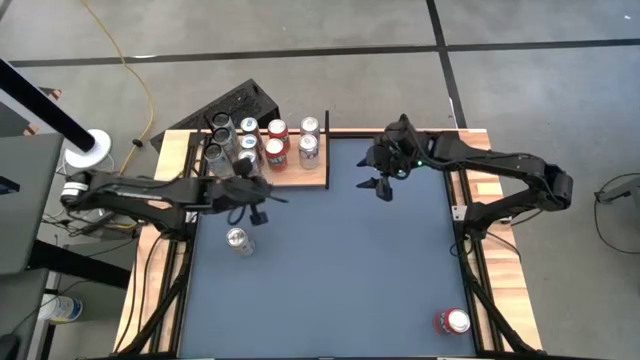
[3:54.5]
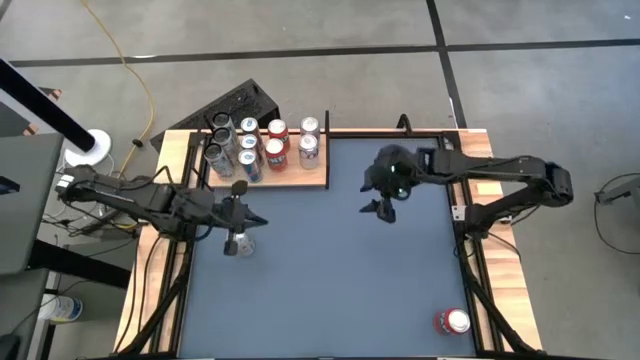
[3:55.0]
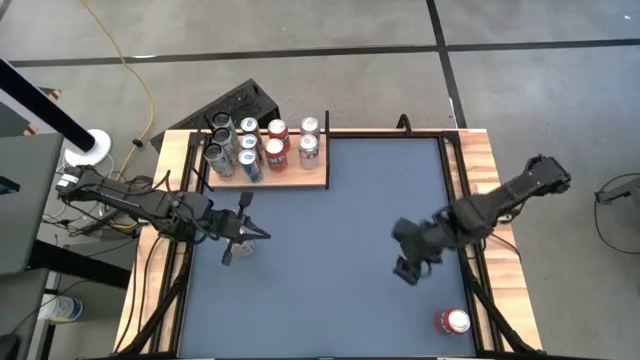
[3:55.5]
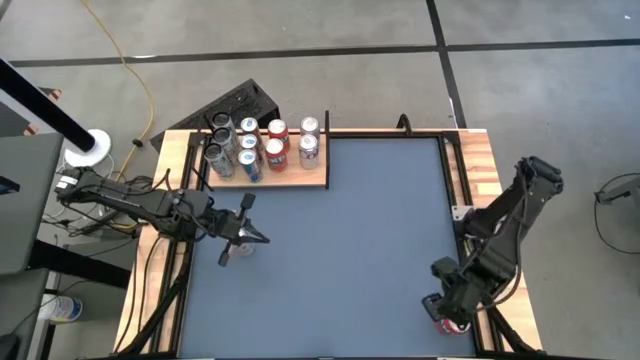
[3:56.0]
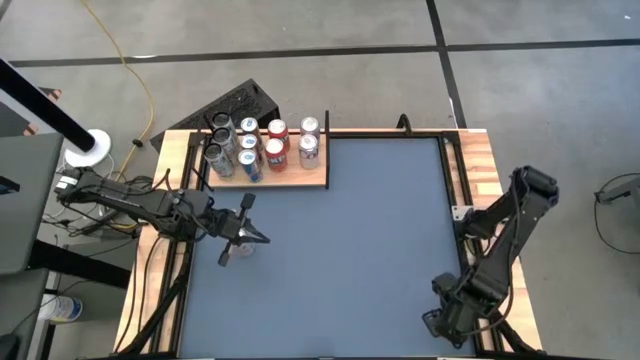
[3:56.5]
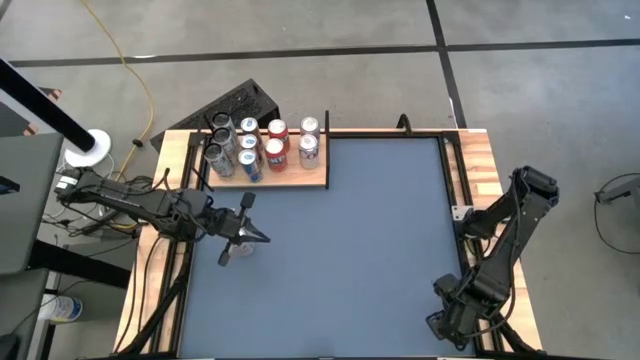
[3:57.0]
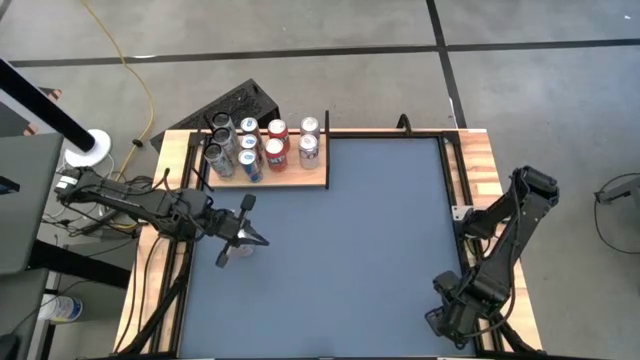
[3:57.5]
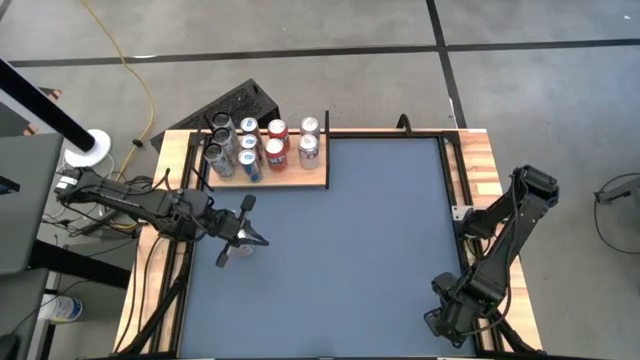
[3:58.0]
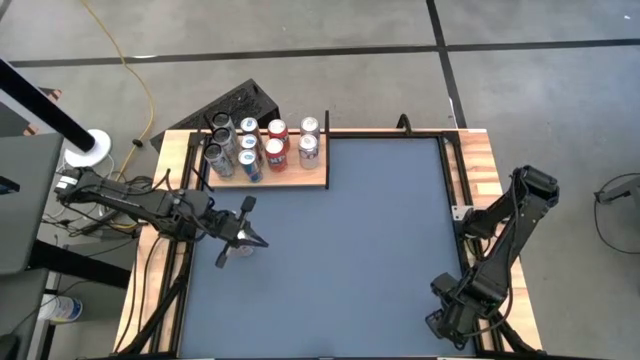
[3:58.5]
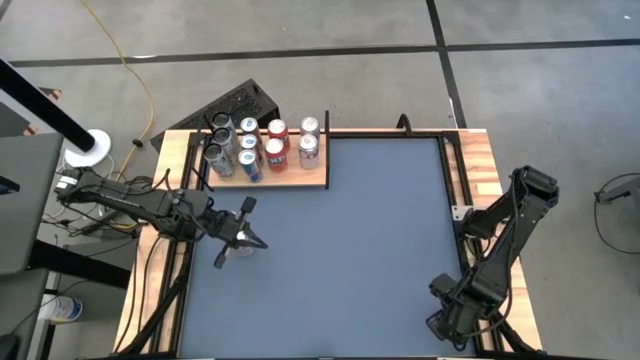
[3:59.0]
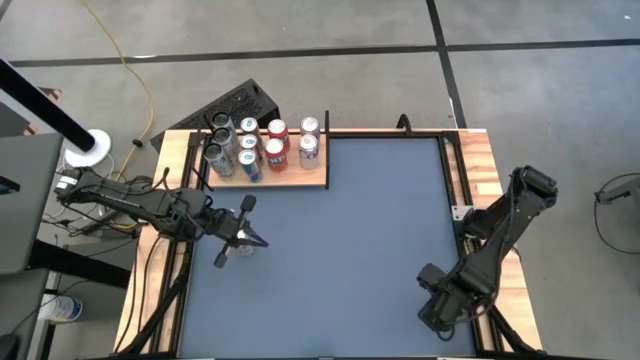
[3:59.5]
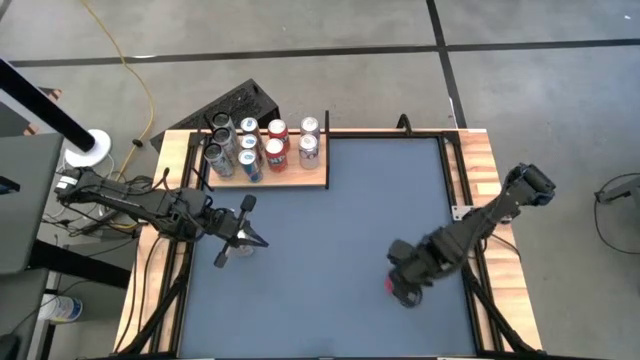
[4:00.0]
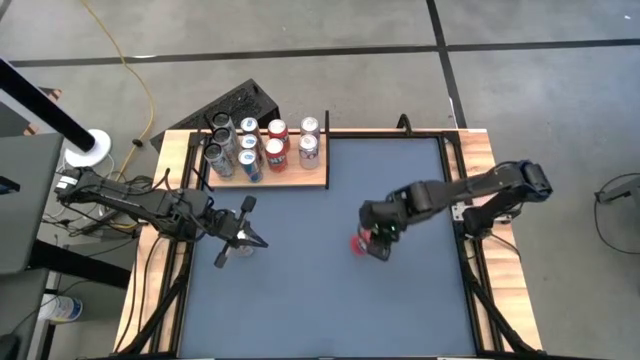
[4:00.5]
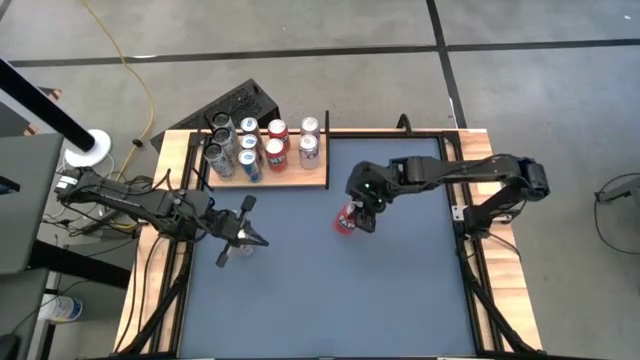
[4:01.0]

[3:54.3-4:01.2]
Task: Place canned beverage on shelf
Put the red soda can on the shelf aligned with the other orange soda can

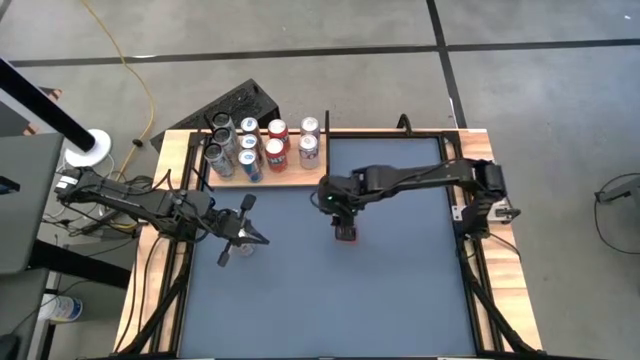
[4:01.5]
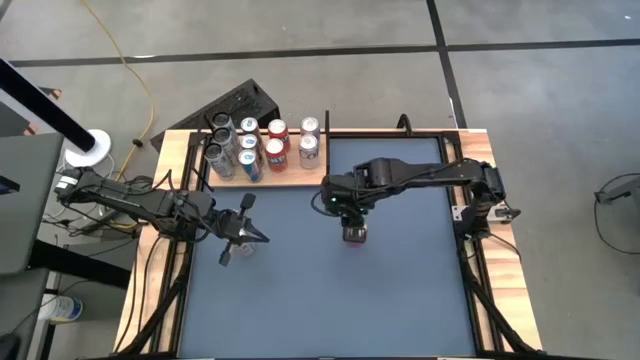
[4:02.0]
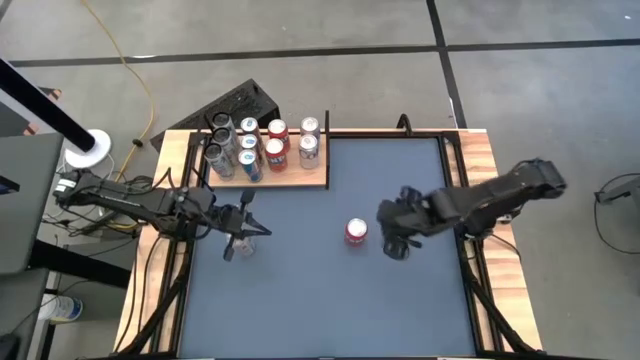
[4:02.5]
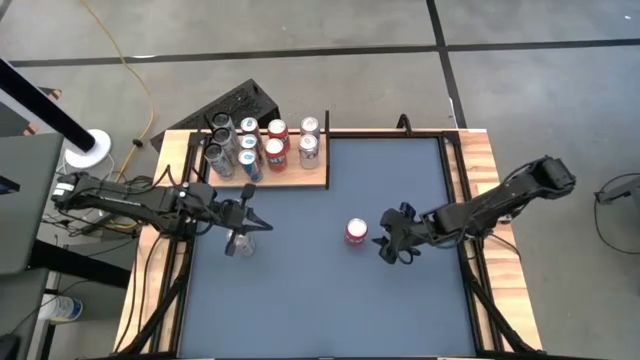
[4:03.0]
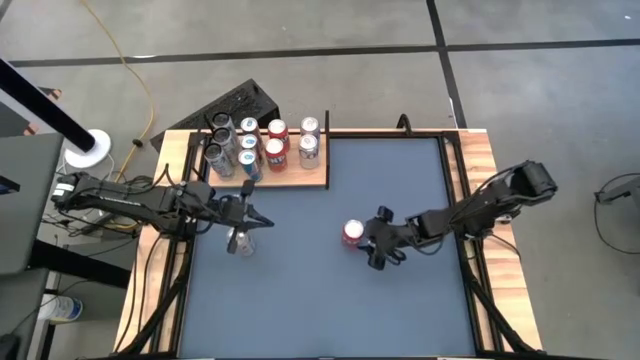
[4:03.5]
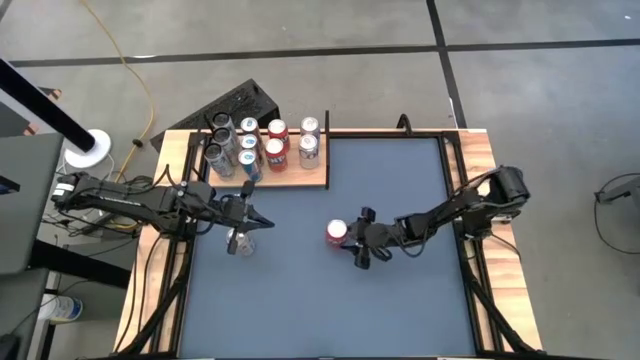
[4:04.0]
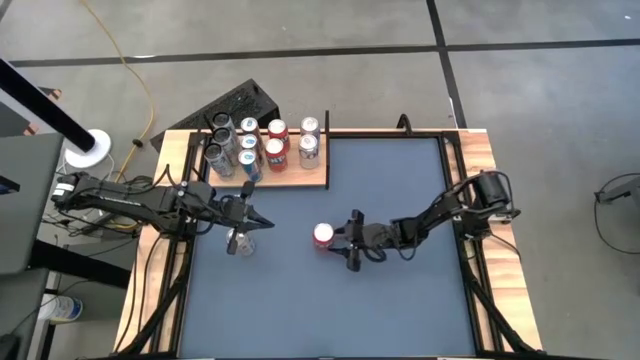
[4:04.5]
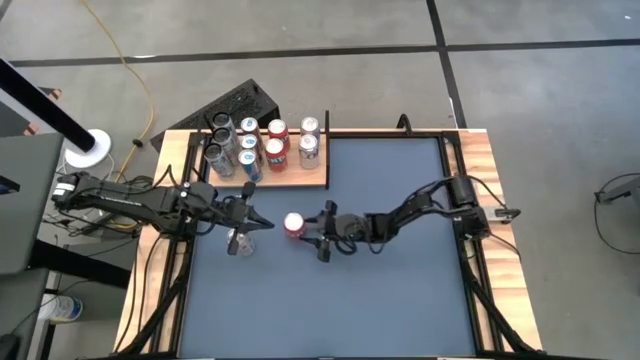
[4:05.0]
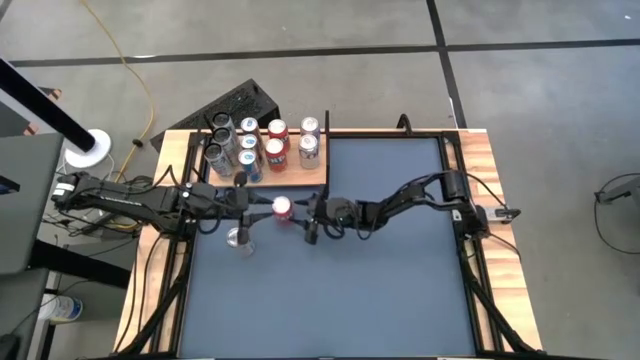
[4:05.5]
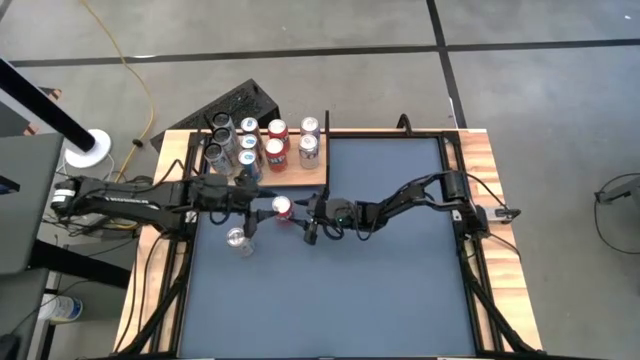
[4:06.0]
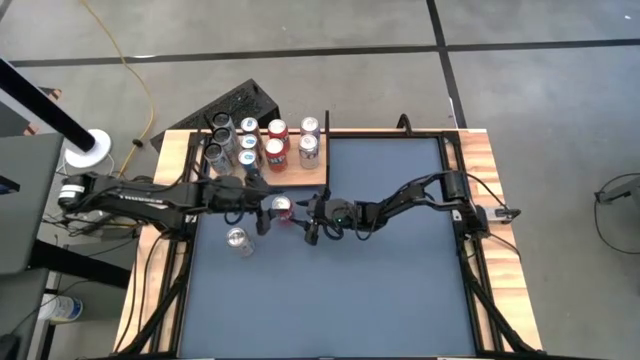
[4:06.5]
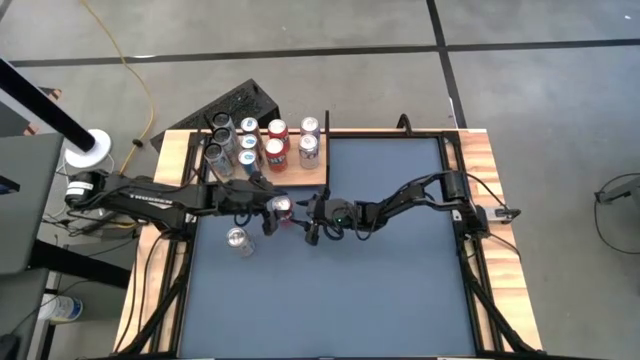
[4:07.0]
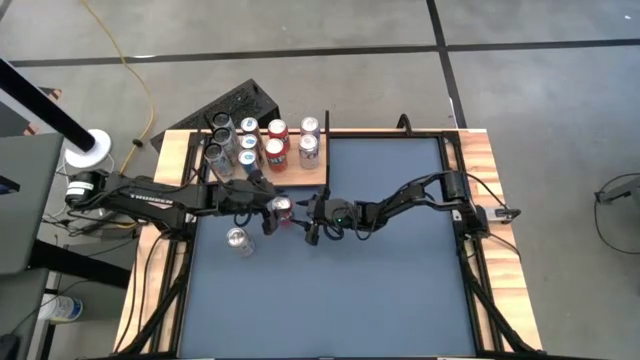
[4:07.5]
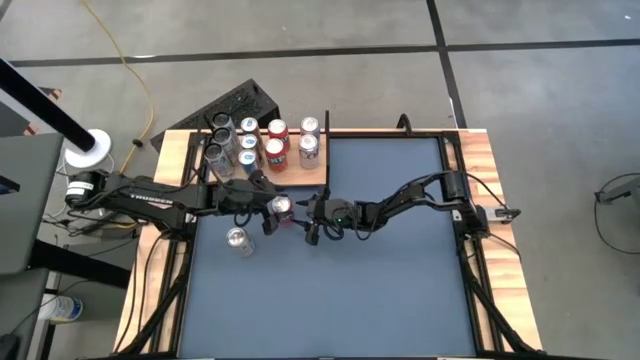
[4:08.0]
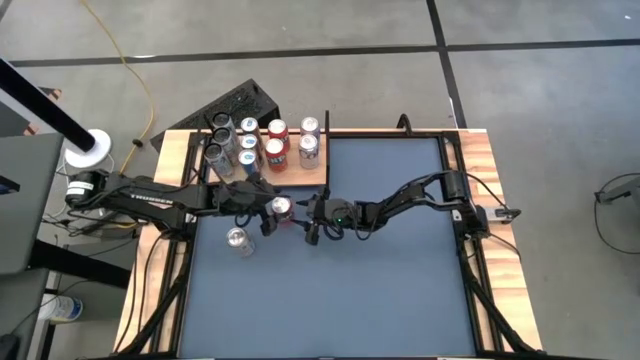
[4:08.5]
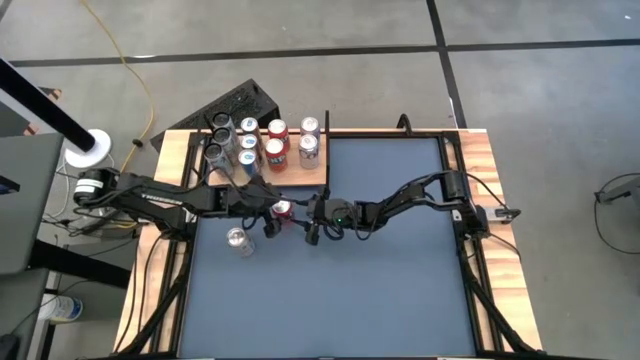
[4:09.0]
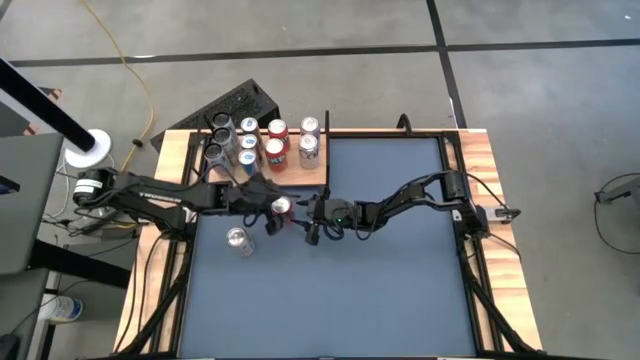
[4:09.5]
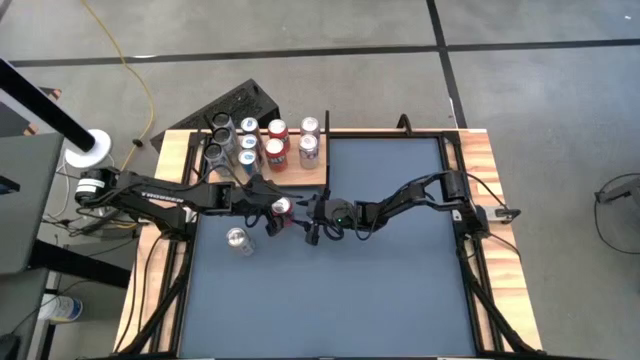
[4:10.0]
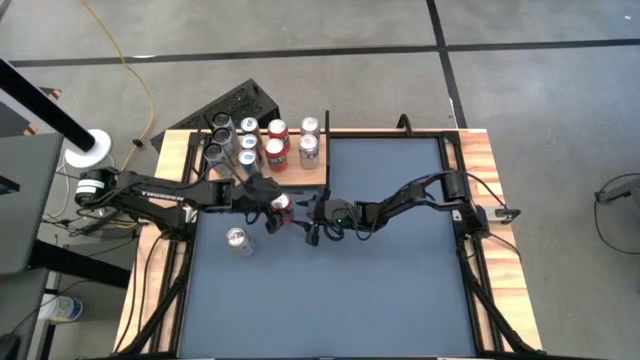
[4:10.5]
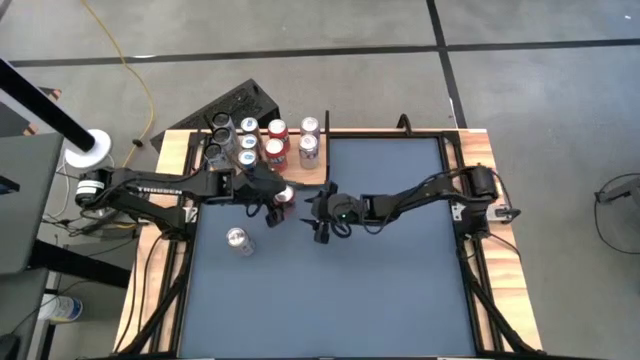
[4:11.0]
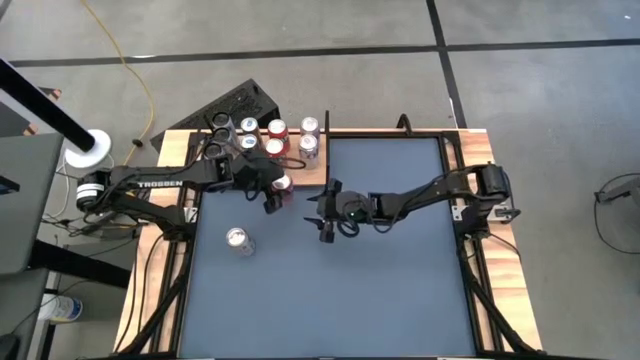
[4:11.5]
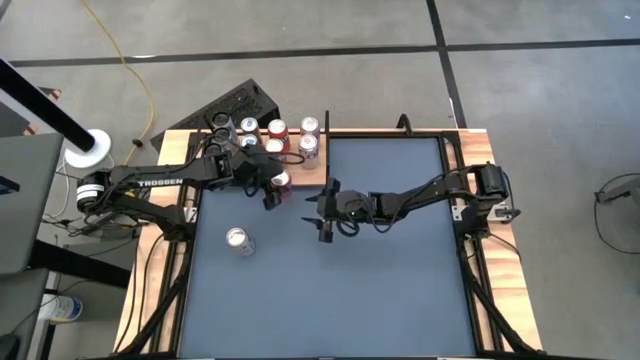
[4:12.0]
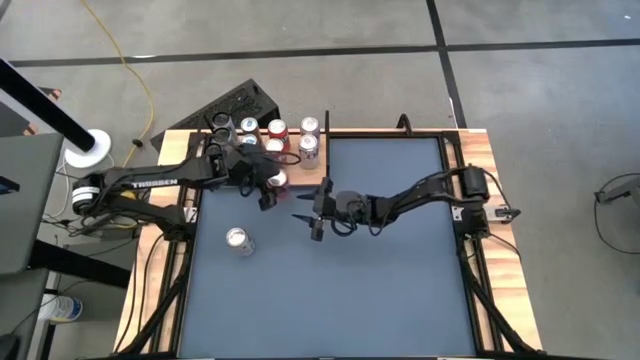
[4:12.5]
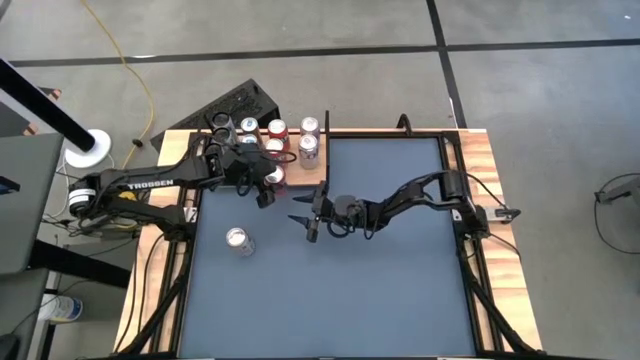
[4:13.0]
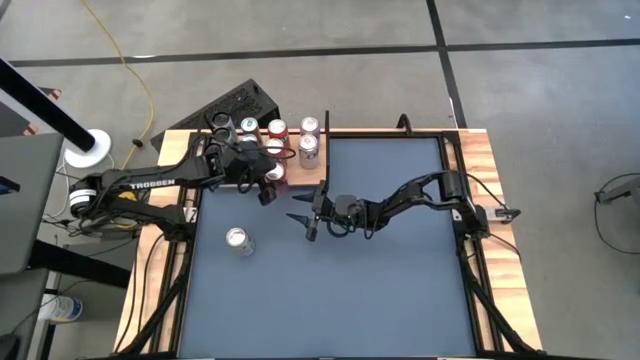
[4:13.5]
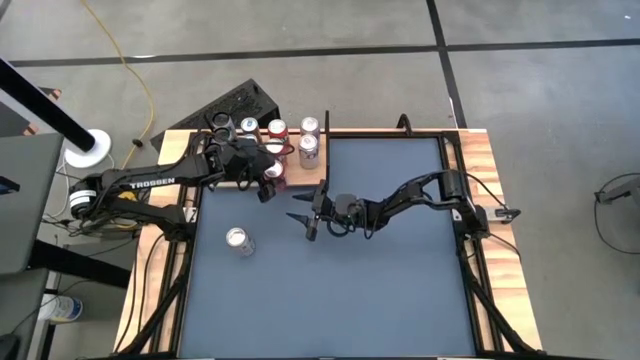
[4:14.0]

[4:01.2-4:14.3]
Put the red soda can on the shelf aligned with the other orange soda can

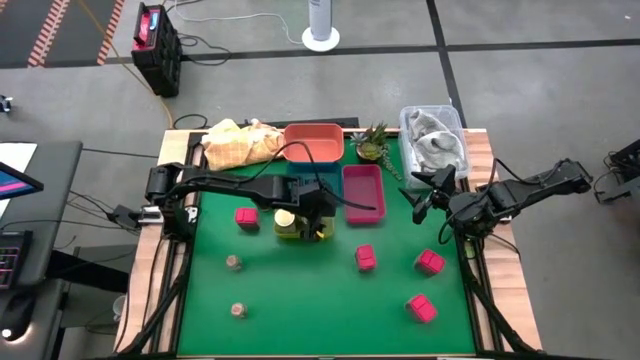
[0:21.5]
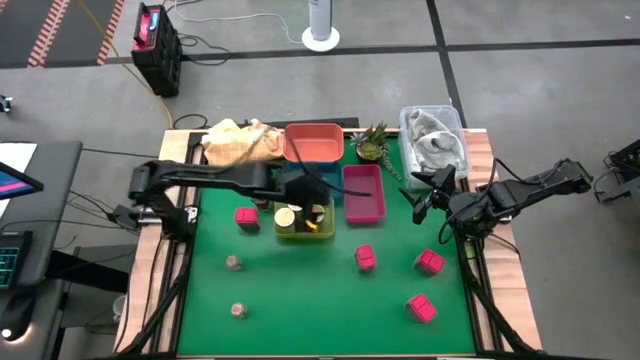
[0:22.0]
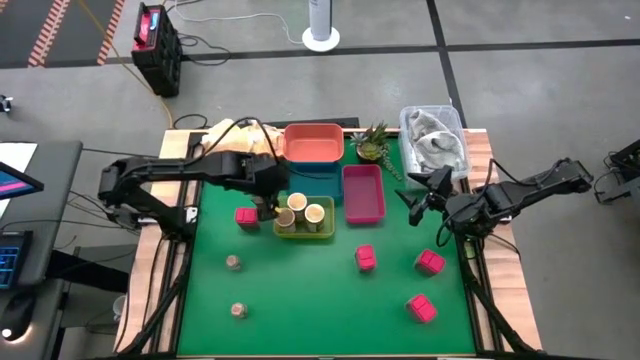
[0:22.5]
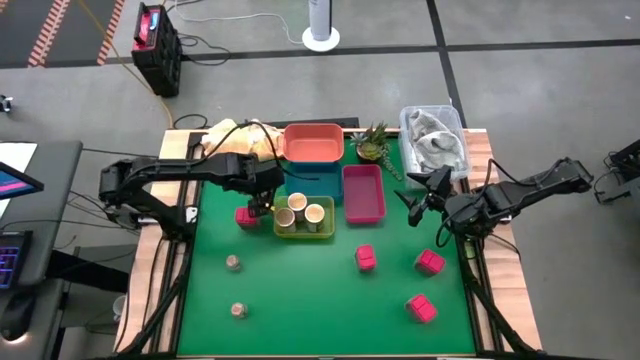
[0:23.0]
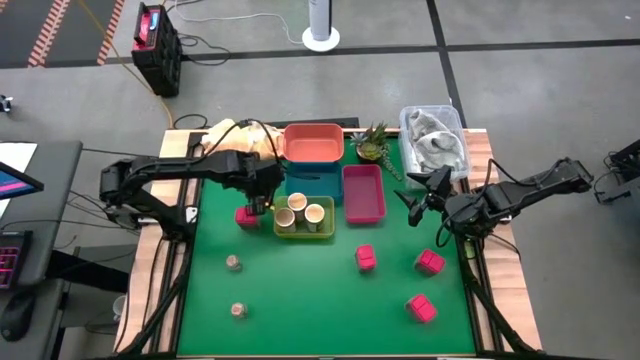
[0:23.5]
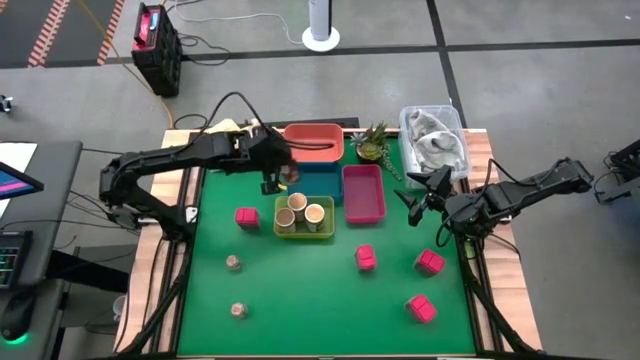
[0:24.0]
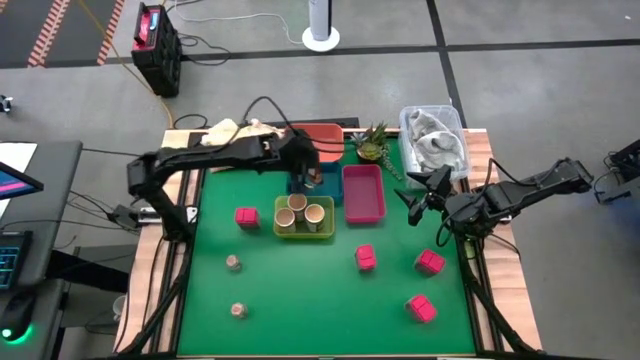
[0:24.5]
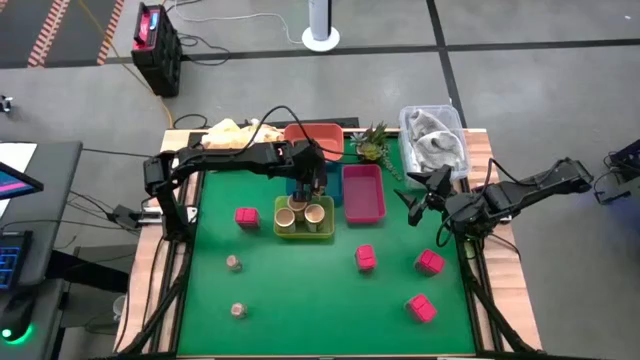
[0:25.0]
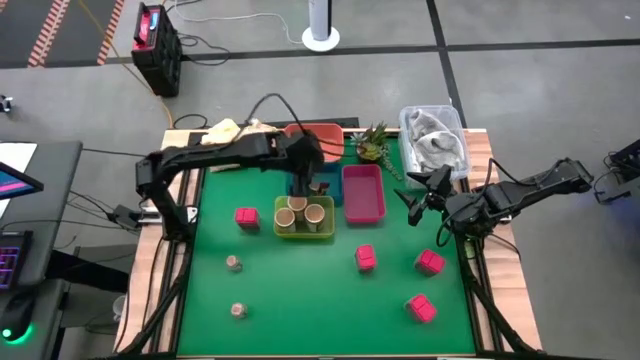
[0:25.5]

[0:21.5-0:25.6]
Task: Sort spices by type
Put the brown seasoning pack into the blue bin
